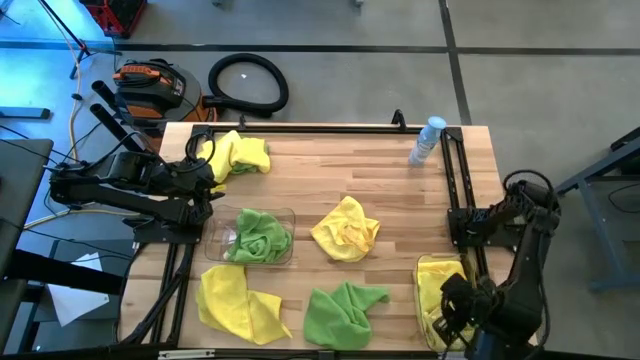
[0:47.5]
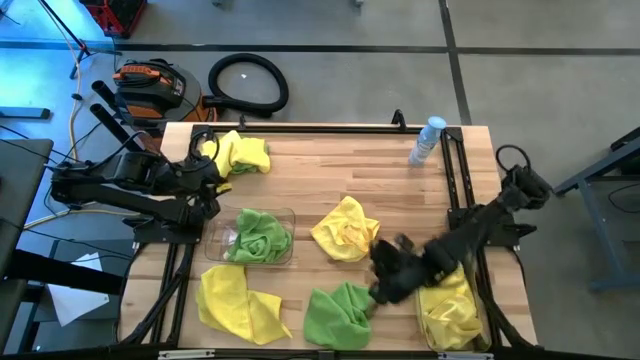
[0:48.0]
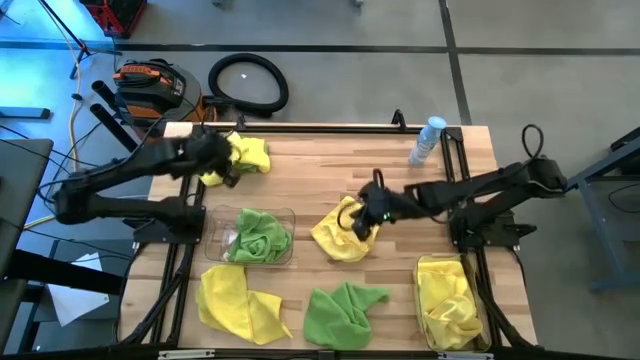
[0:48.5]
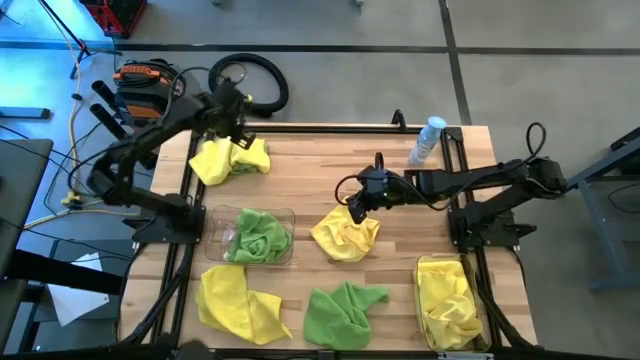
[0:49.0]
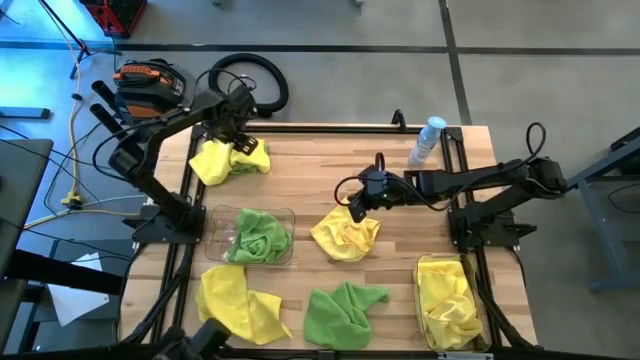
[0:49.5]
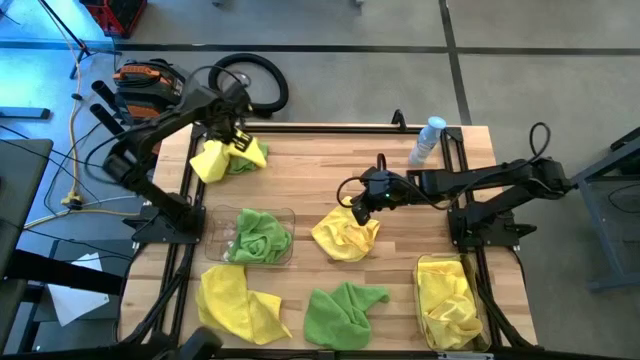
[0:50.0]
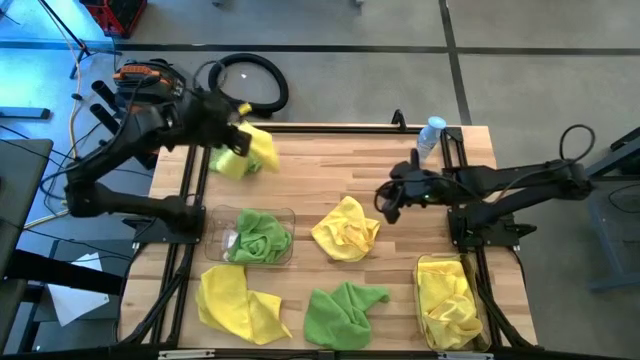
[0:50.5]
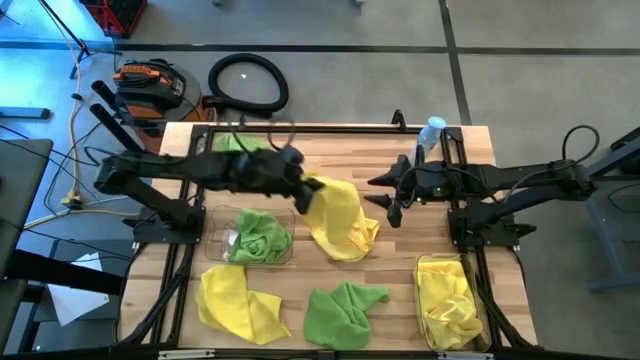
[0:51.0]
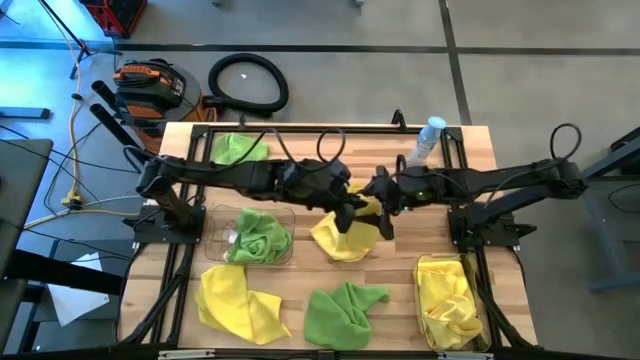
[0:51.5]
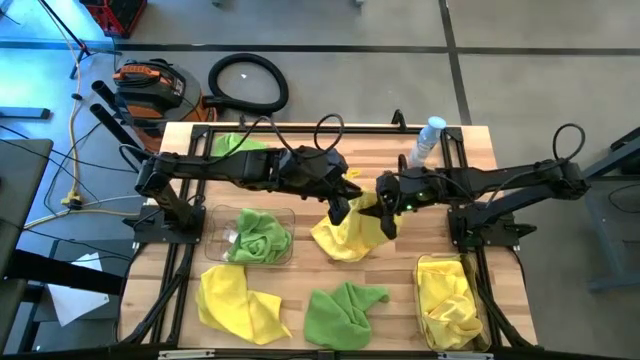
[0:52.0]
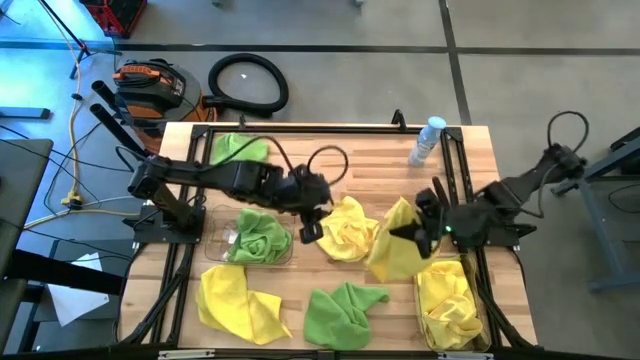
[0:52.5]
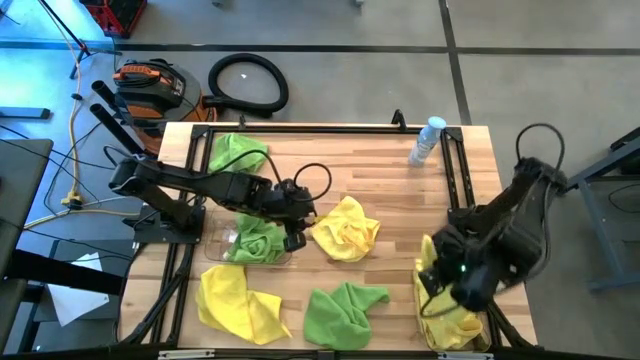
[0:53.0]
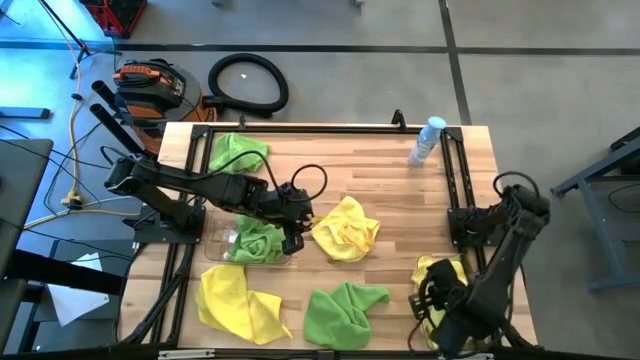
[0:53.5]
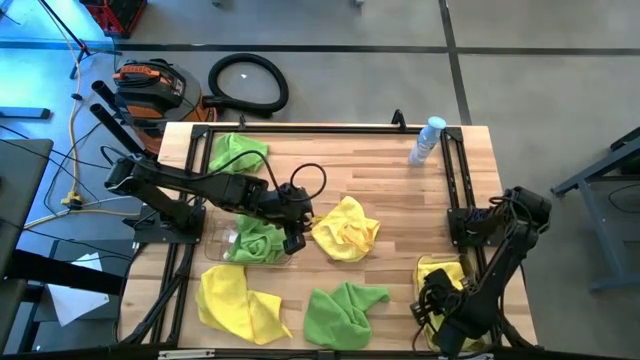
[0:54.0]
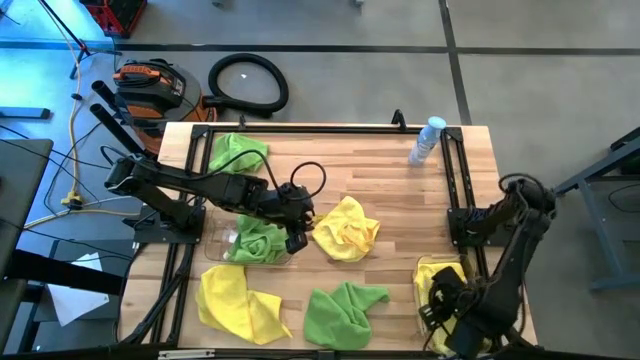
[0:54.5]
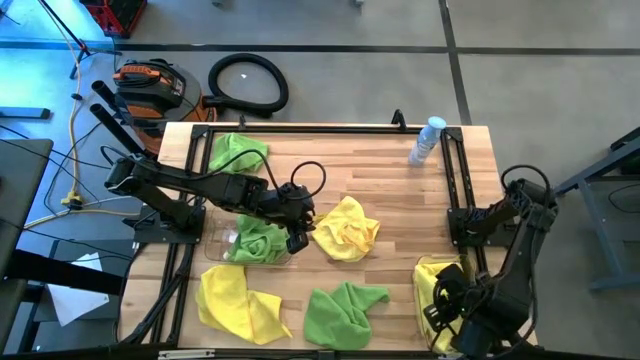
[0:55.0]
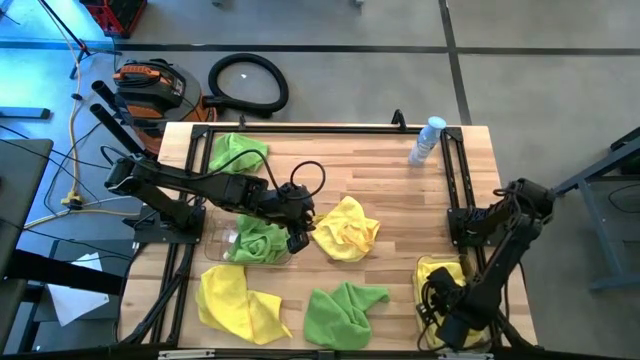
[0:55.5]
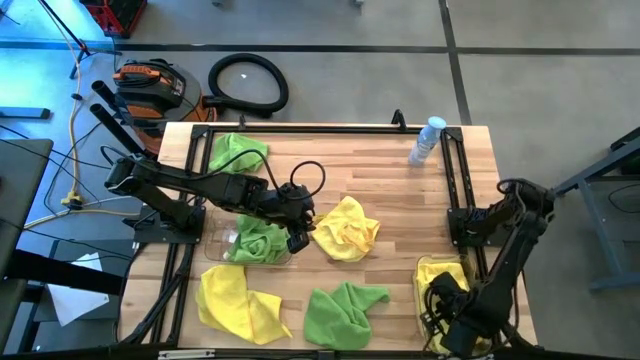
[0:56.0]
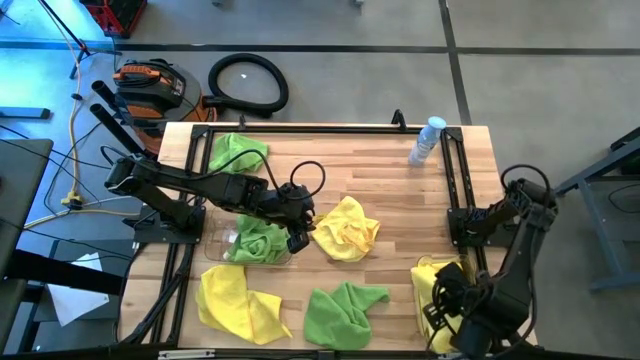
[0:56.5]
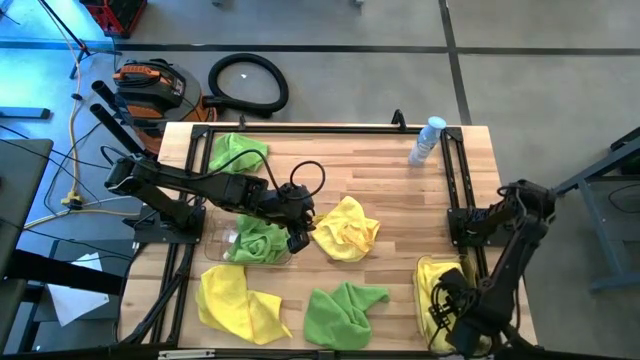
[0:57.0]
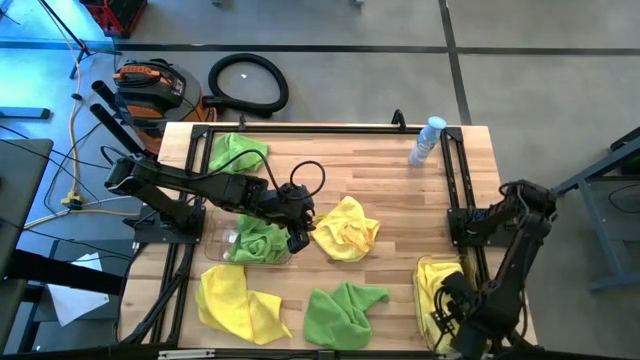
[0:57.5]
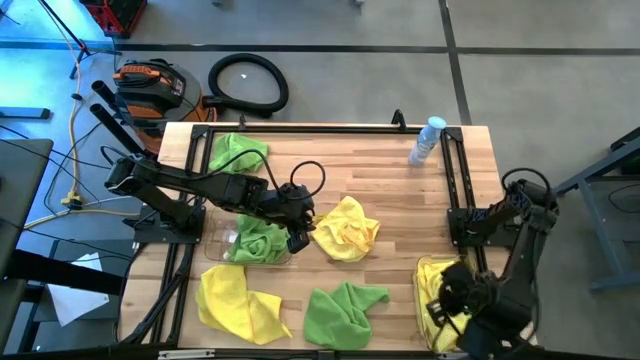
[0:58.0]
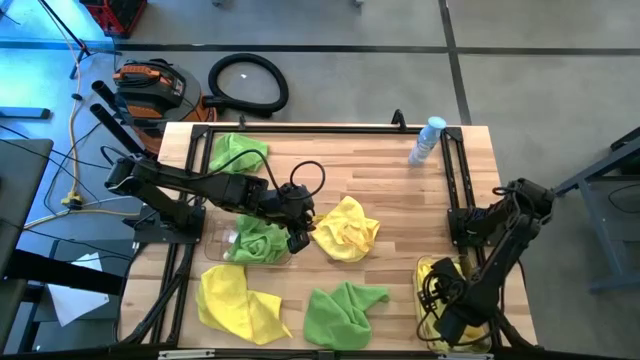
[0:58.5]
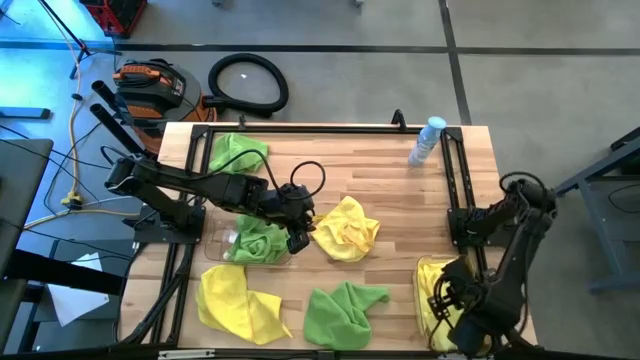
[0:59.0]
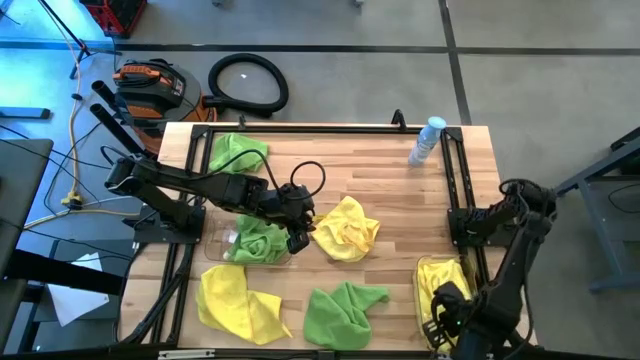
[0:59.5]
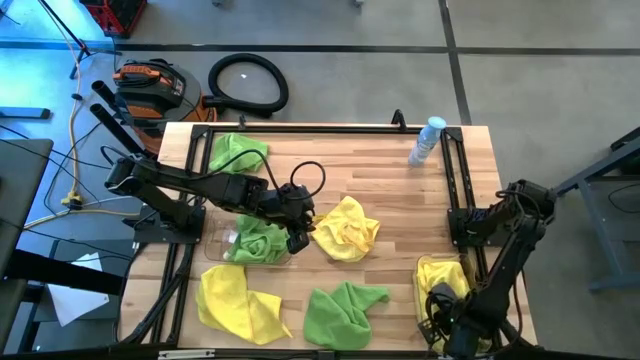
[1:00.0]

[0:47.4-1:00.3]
Task: Sort microfiber towel by color & place in baskets
Put the yellow towel into the right transparent bin

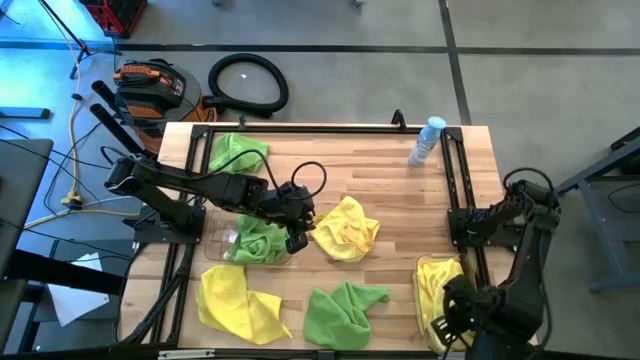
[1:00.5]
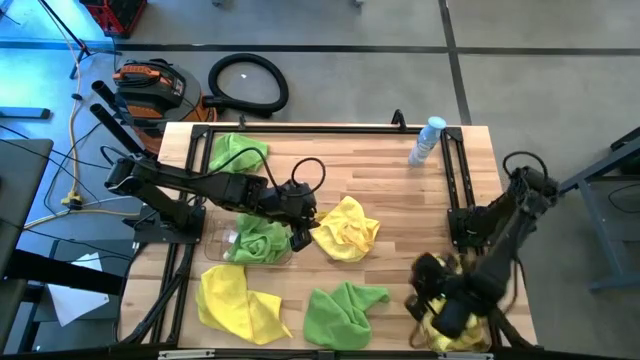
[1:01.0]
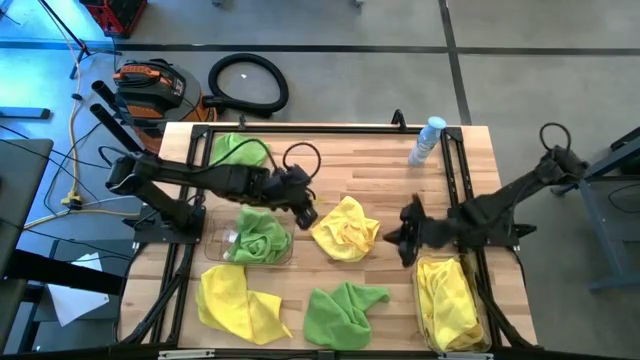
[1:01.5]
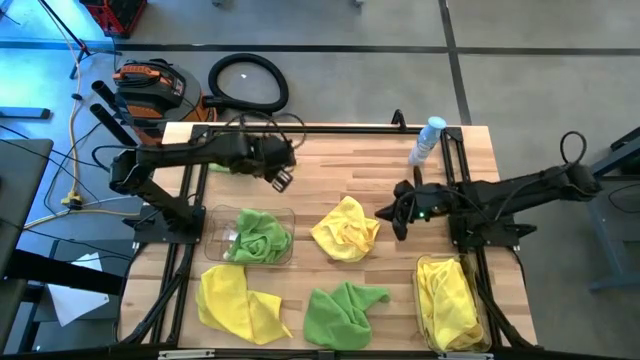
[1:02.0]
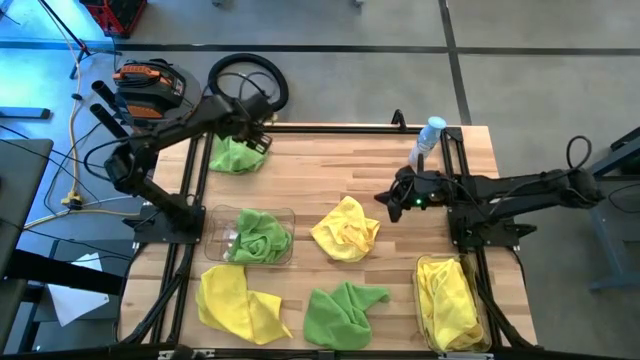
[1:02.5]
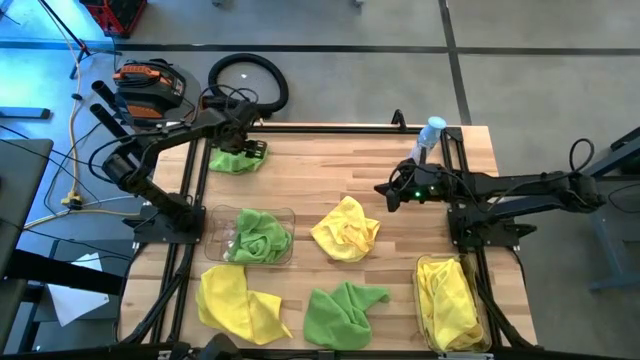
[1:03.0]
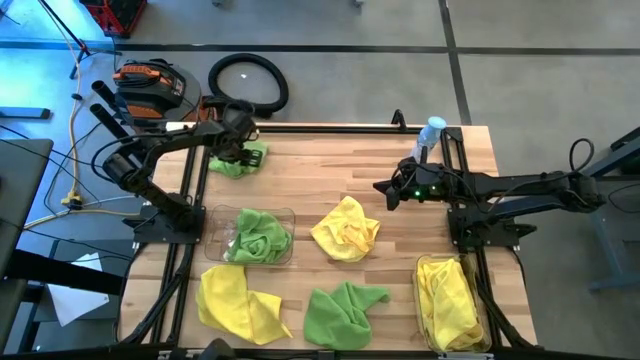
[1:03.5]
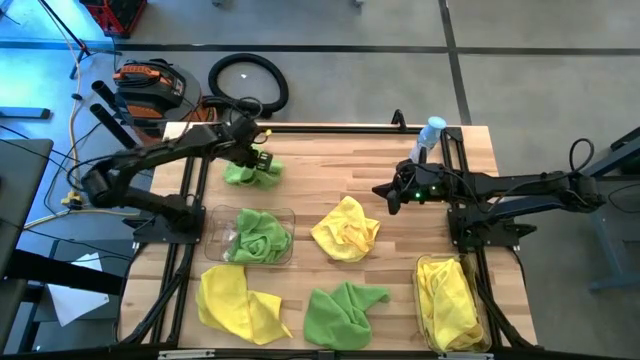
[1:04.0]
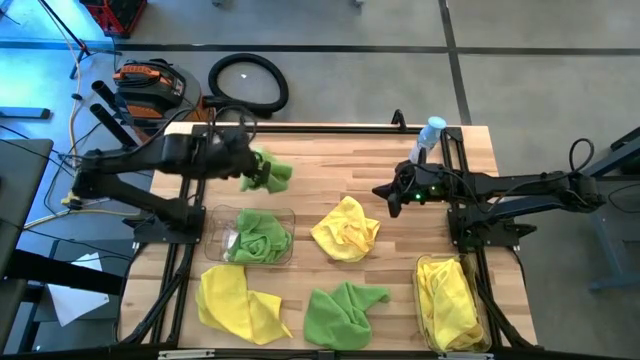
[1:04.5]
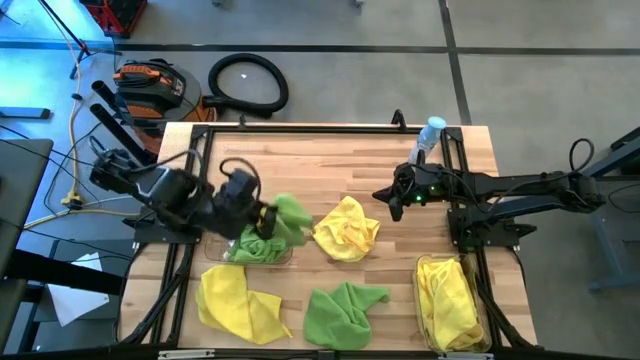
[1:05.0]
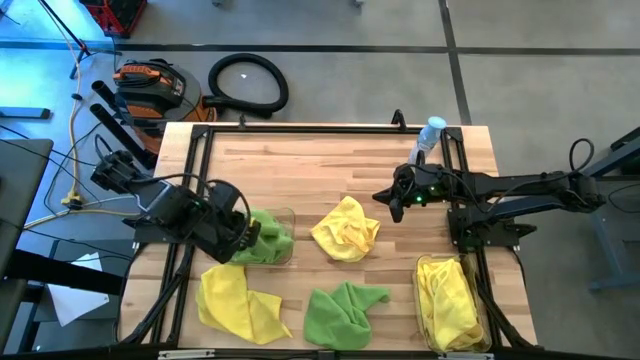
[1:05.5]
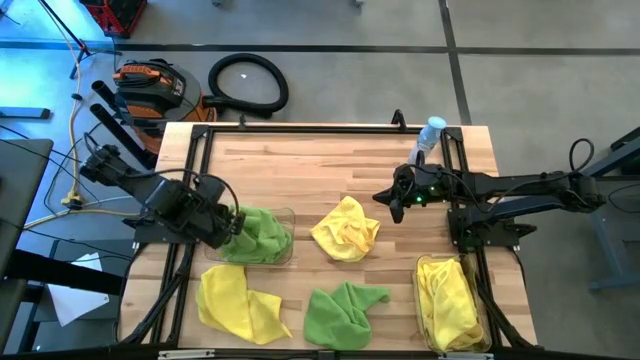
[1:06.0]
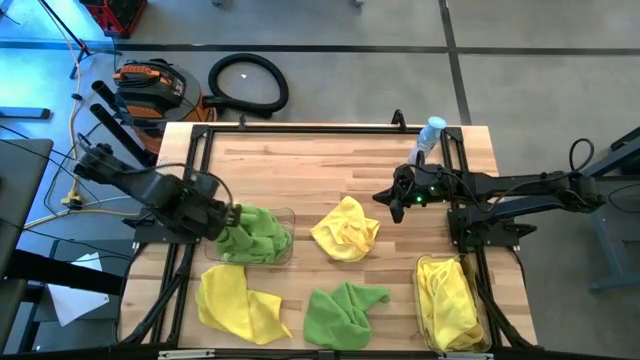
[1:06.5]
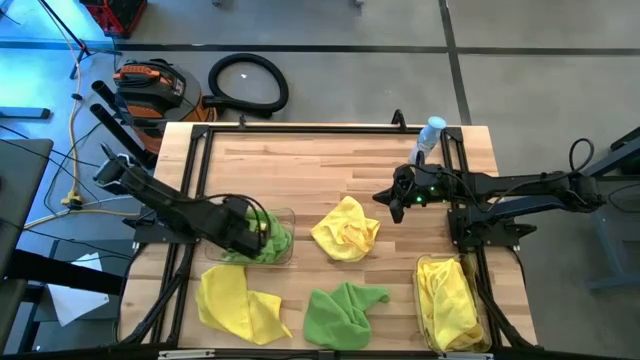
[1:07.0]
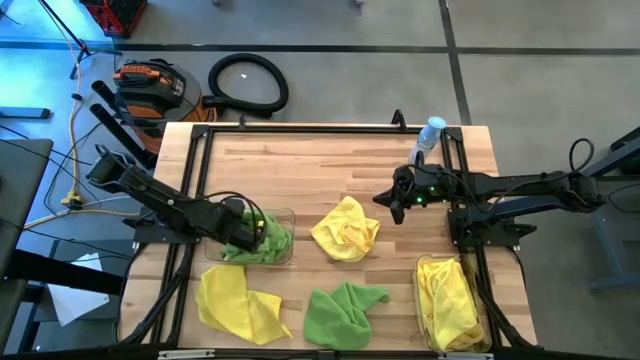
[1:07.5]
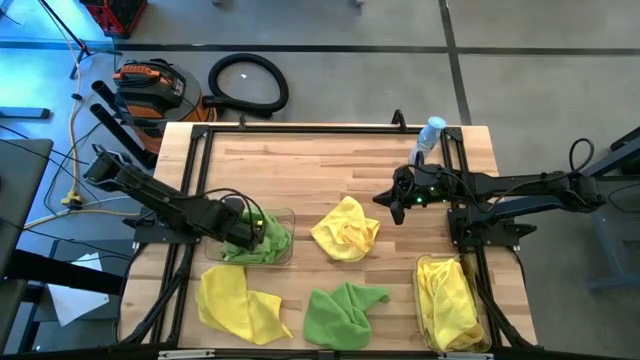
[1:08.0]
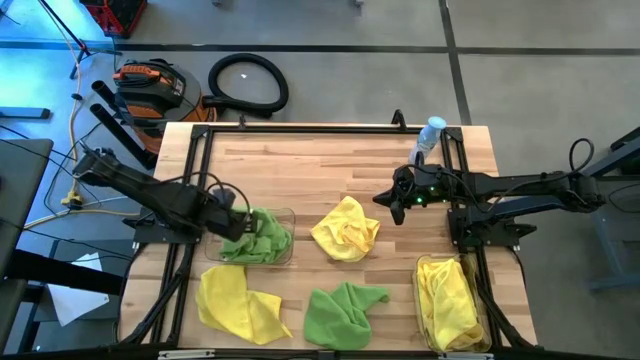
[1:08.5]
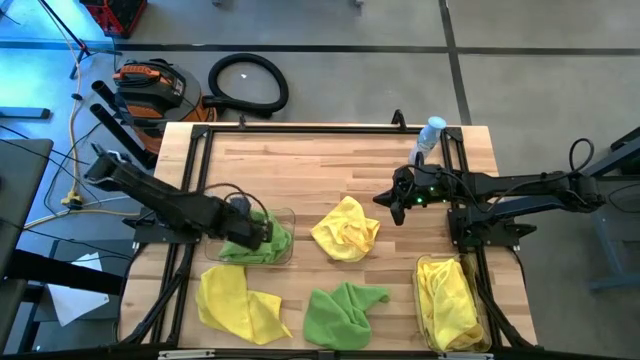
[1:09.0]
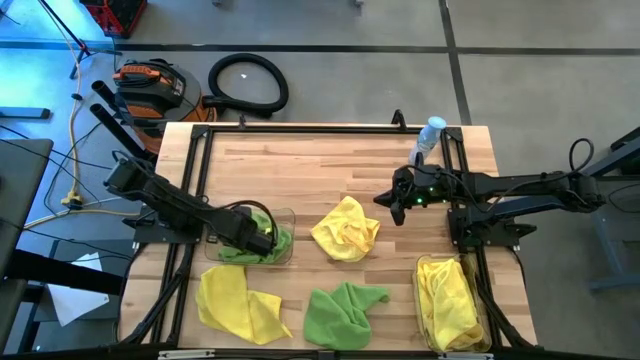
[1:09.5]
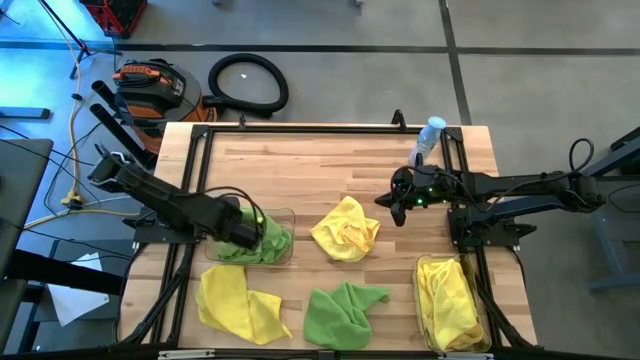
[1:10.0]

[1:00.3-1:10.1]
Put the green towel into the left transparent bin
